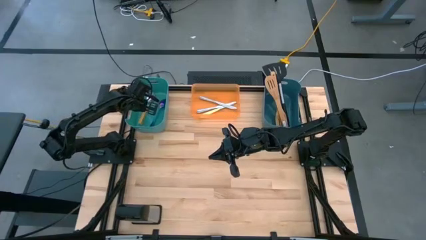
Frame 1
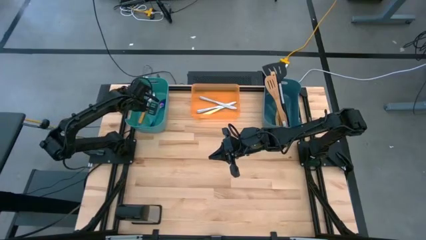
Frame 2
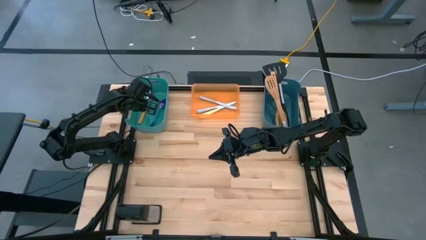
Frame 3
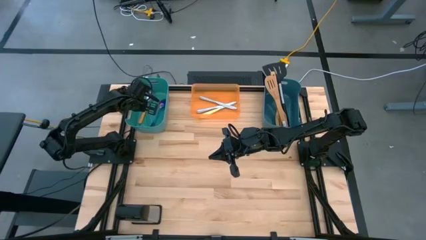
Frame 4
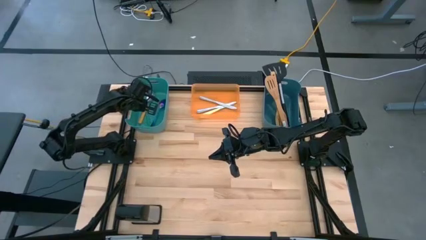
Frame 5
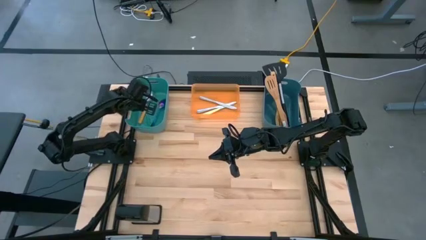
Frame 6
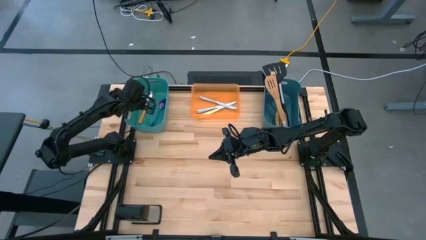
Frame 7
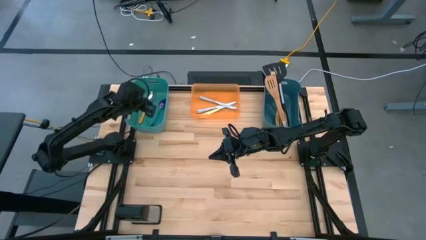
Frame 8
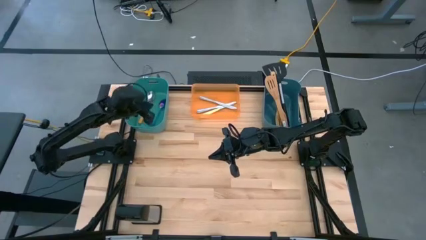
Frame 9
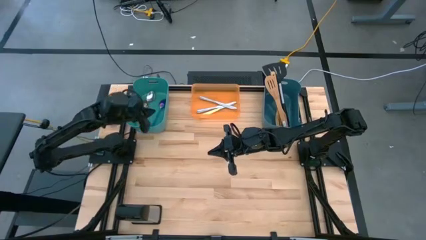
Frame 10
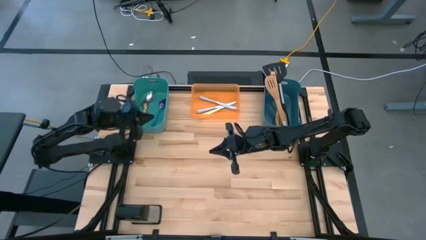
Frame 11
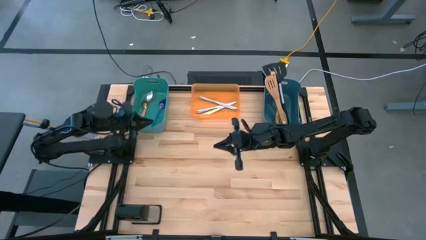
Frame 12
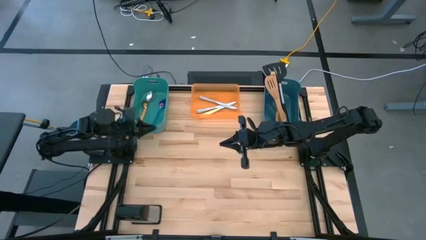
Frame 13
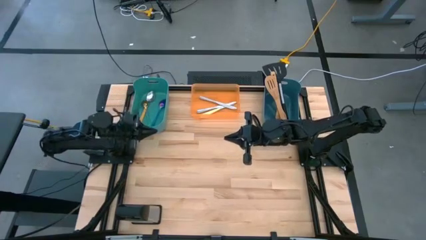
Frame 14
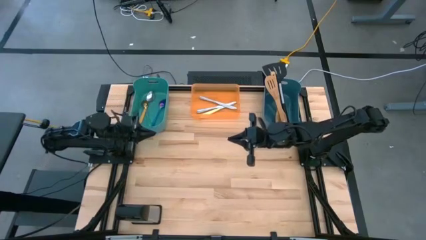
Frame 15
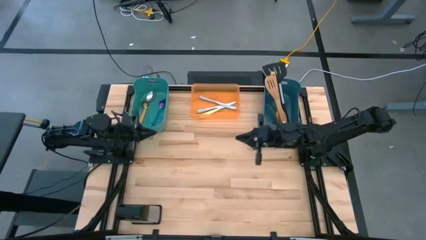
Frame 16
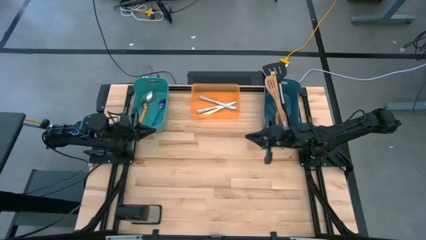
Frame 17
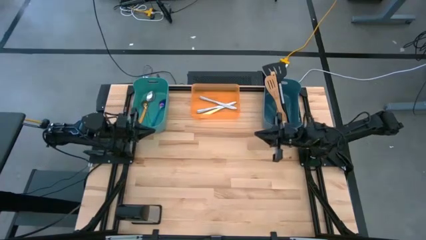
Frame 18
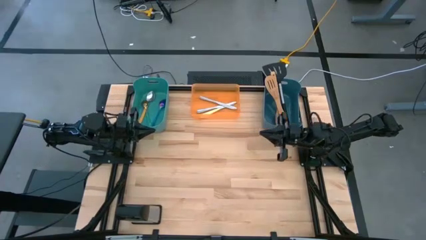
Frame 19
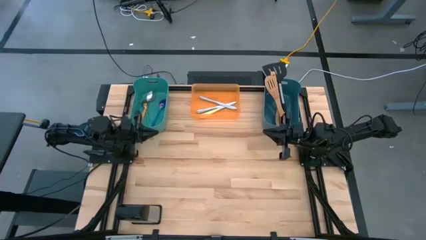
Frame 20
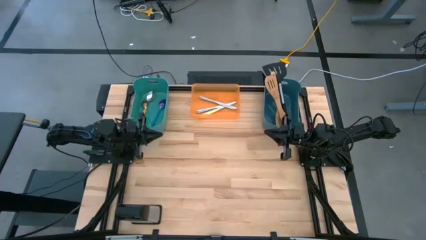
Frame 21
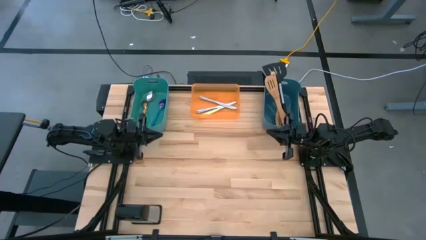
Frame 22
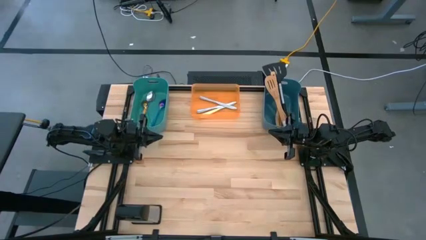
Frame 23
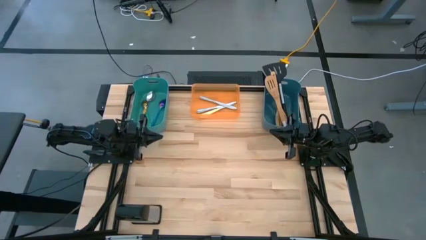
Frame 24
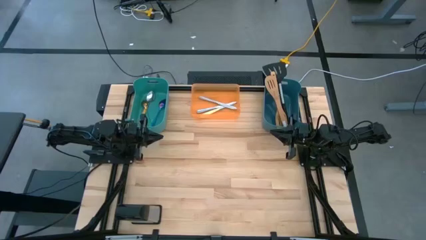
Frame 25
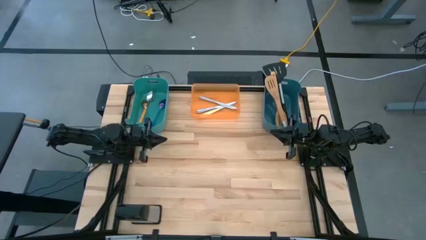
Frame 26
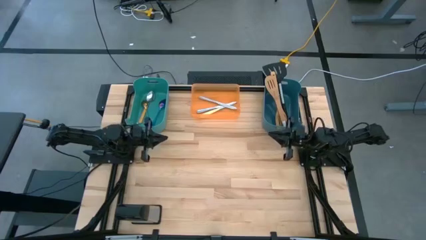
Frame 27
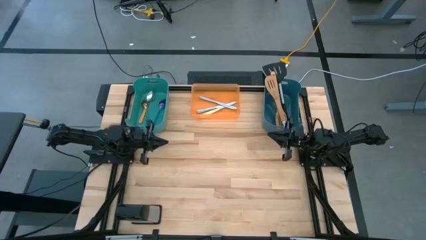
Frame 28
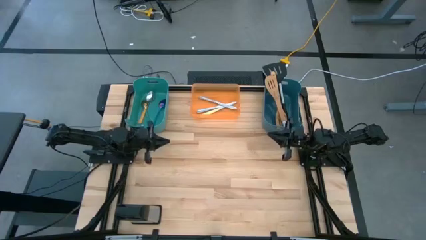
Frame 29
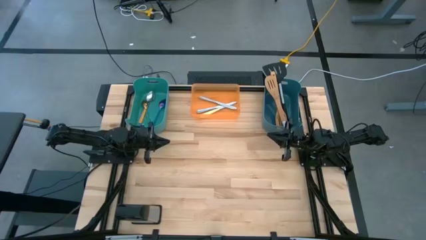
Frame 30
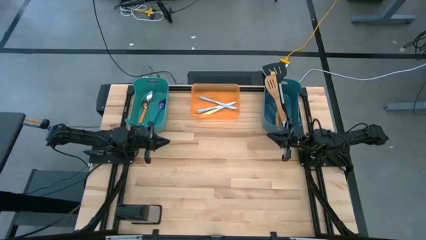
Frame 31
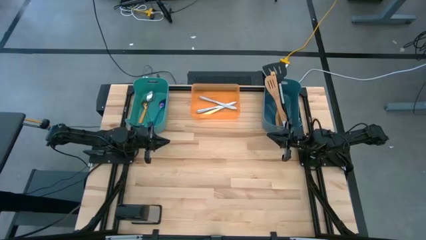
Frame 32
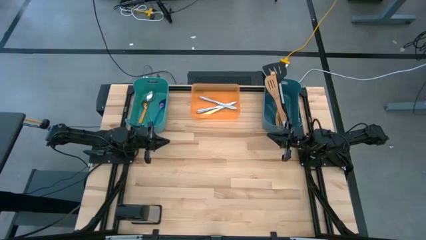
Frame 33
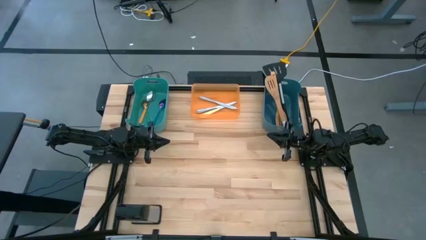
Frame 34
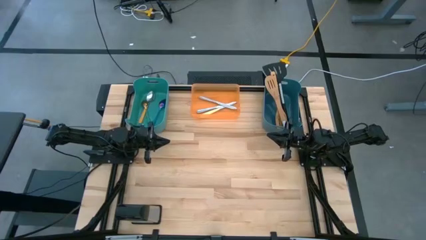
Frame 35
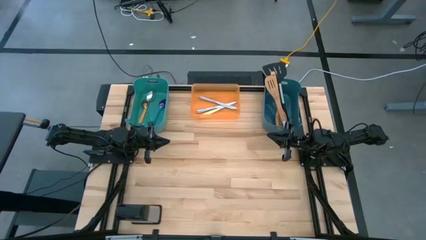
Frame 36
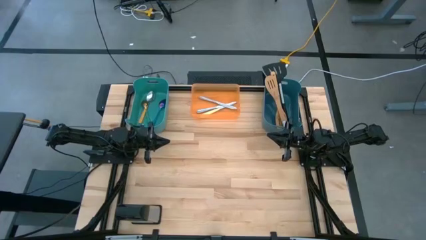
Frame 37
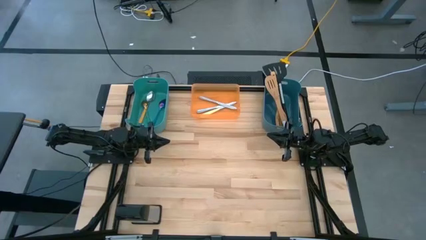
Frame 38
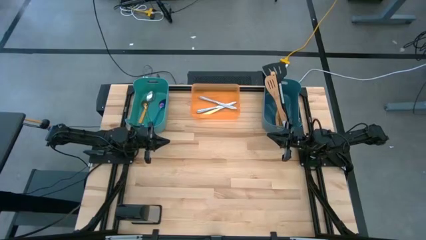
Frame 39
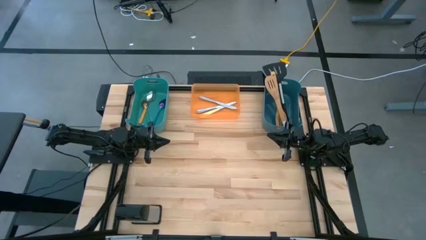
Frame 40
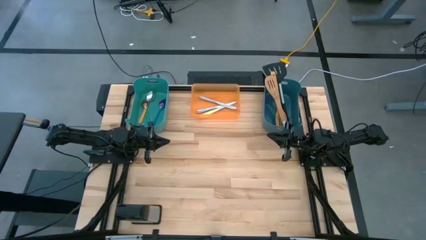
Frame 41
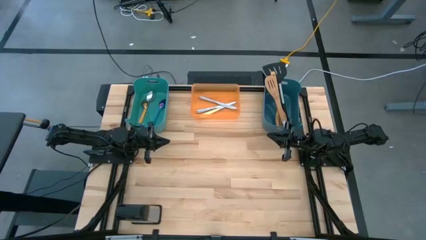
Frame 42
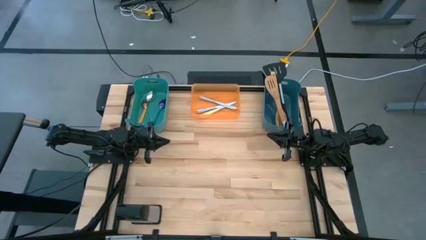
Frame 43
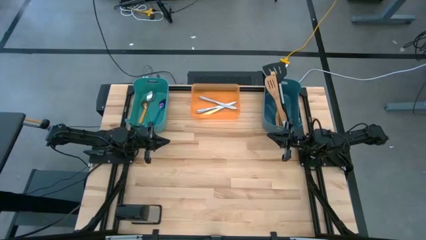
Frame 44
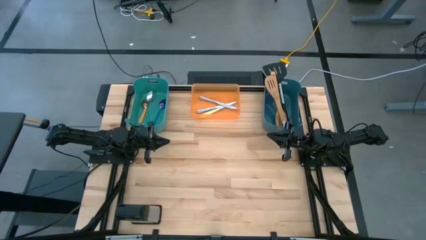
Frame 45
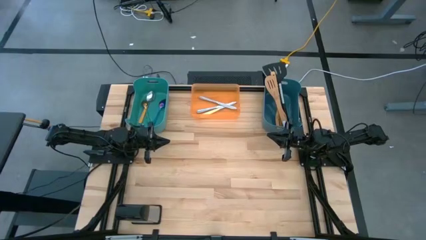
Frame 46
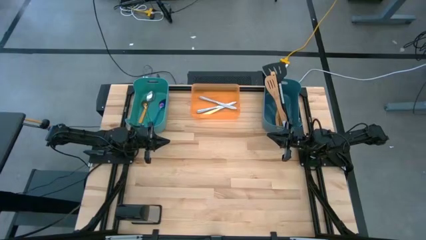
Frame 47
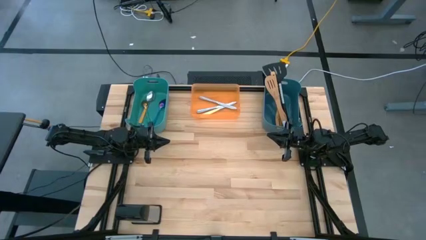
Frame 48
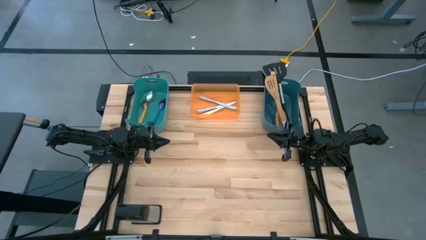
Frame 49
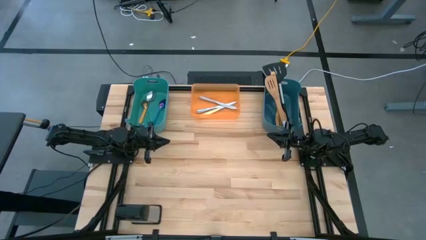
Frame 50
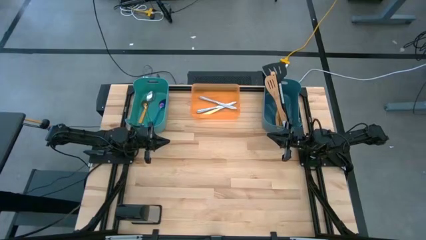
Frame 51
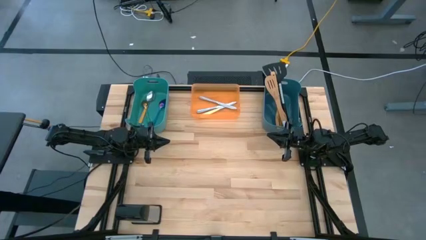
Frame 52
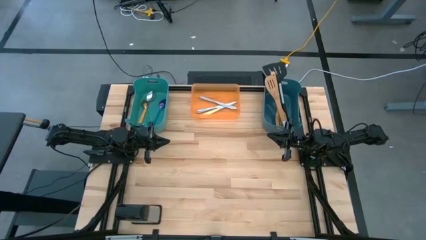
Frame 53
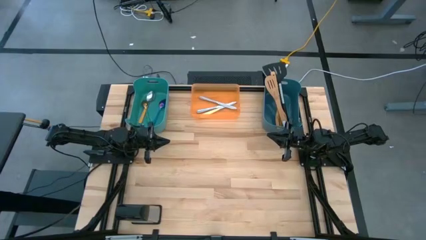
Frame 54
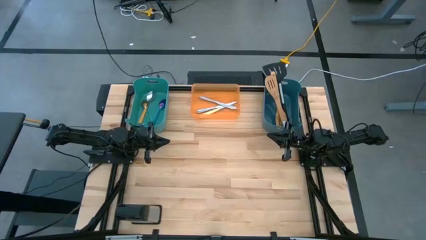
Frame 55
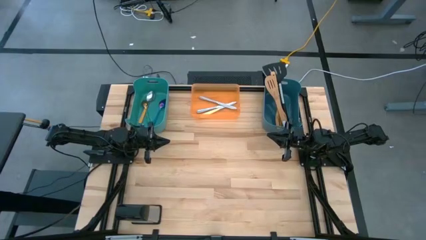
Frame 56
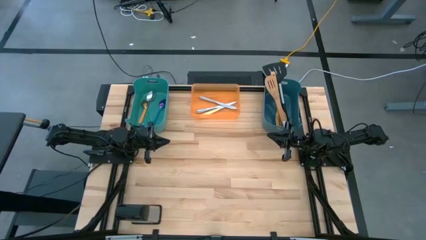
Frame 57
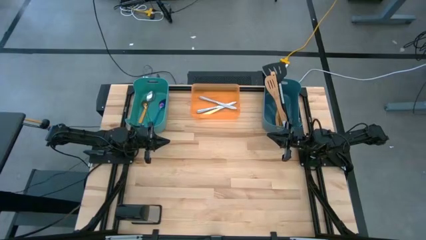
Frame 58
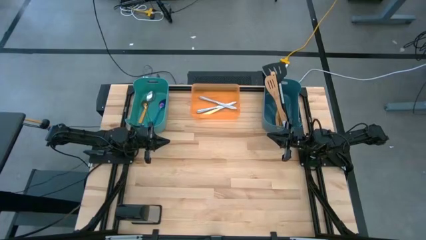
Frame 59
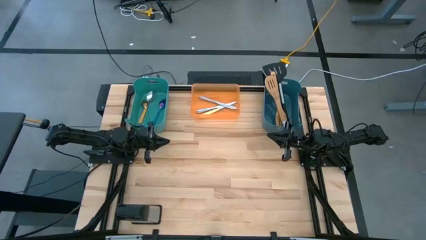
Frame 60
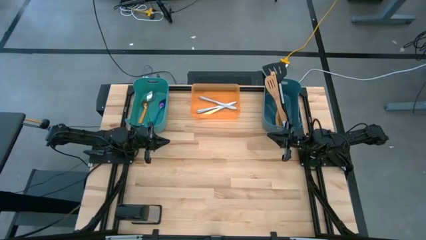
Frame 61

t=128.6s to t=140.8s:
Task: Pick & Place Kitchen Items
Return to Home Position
